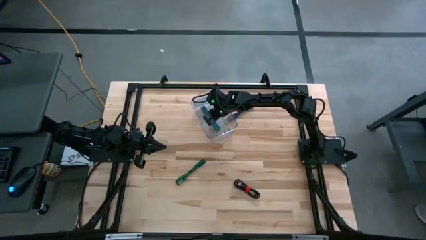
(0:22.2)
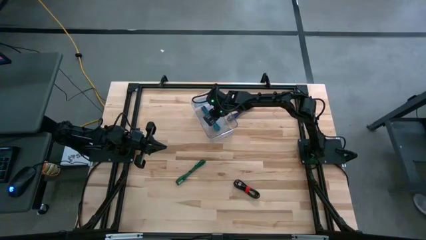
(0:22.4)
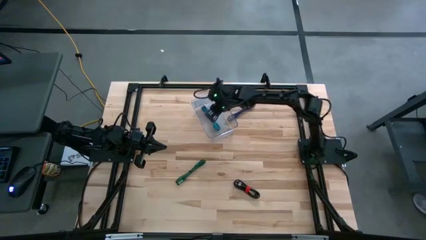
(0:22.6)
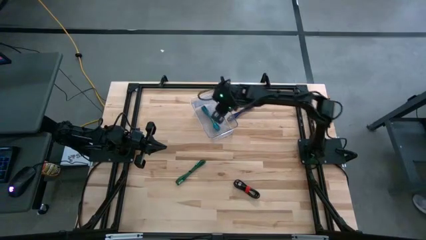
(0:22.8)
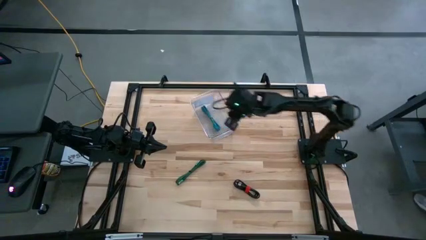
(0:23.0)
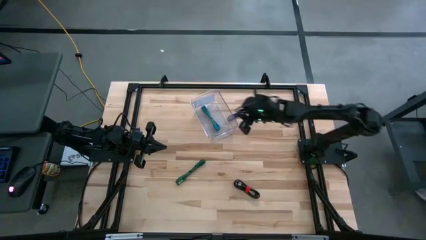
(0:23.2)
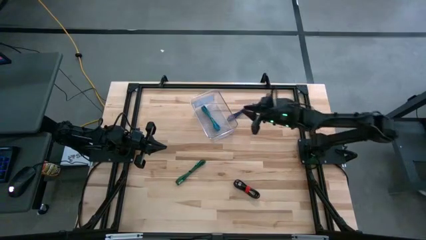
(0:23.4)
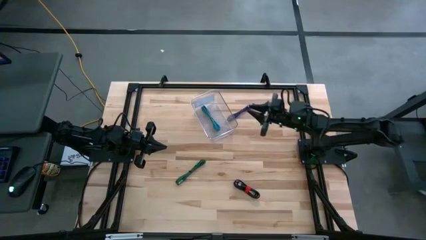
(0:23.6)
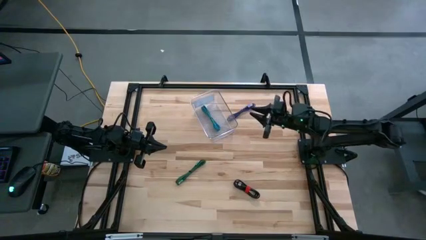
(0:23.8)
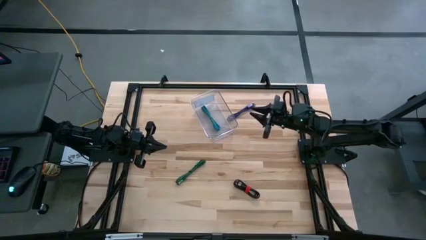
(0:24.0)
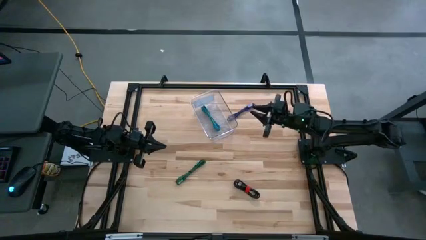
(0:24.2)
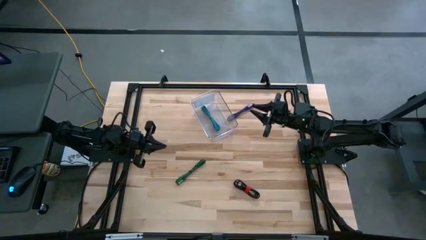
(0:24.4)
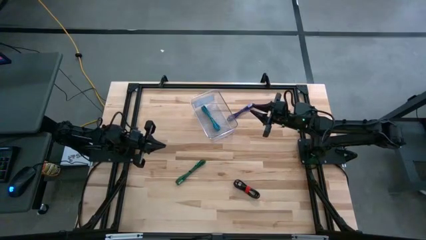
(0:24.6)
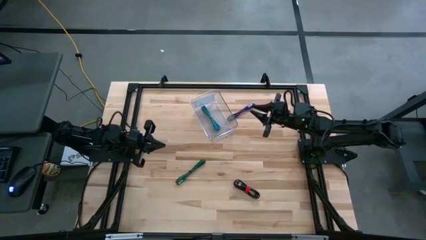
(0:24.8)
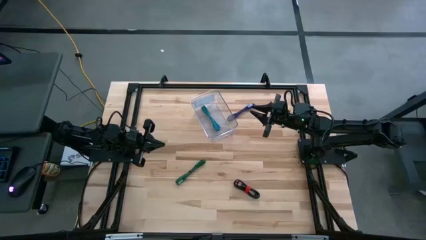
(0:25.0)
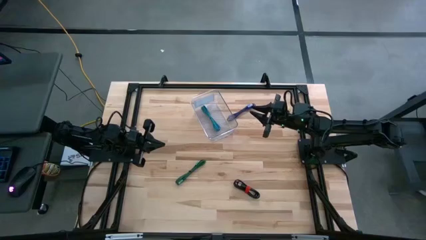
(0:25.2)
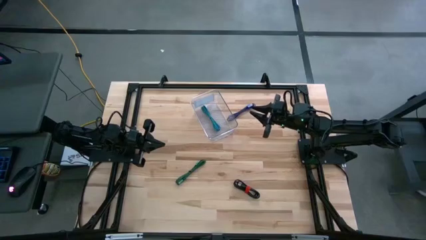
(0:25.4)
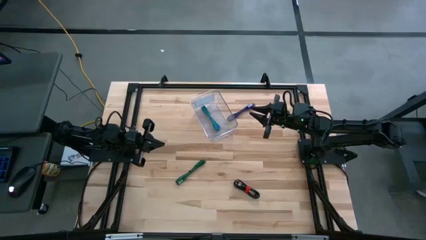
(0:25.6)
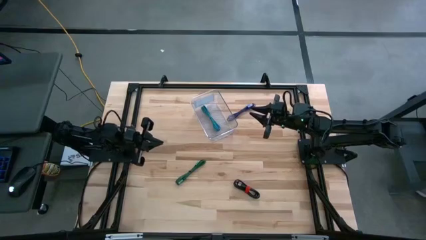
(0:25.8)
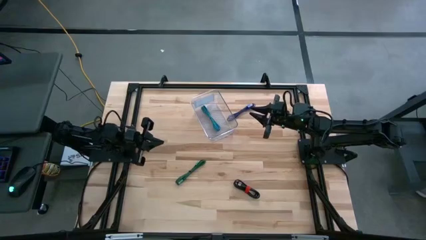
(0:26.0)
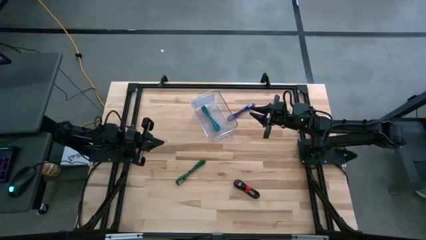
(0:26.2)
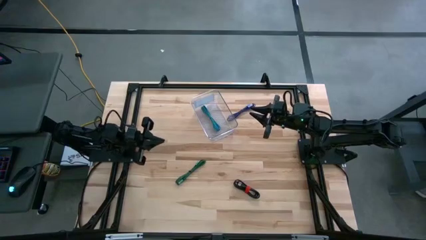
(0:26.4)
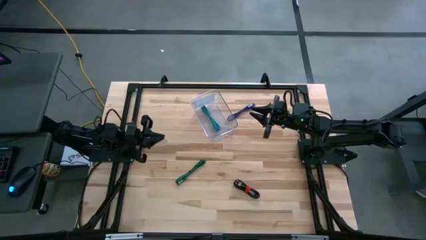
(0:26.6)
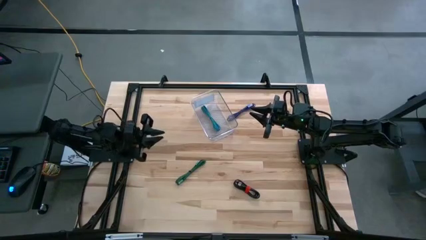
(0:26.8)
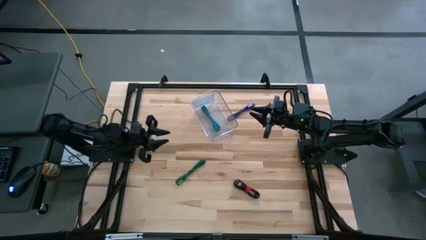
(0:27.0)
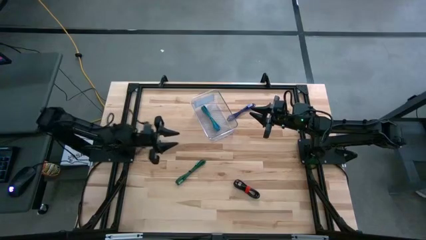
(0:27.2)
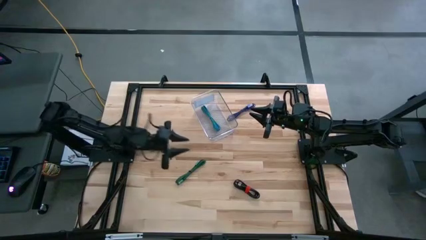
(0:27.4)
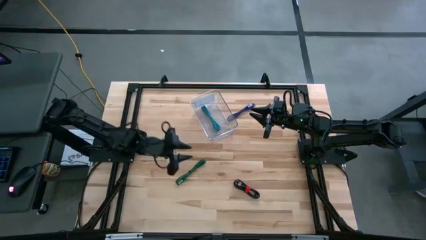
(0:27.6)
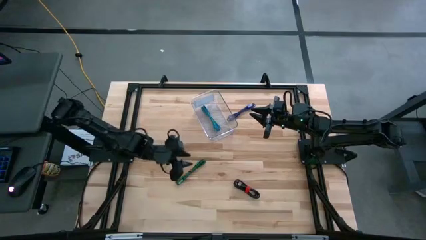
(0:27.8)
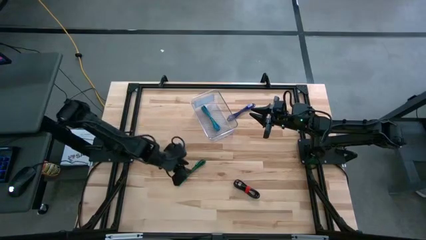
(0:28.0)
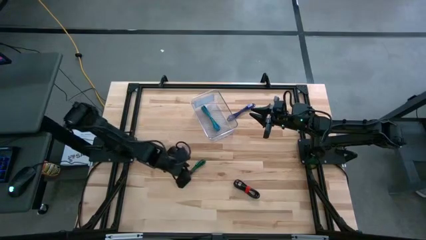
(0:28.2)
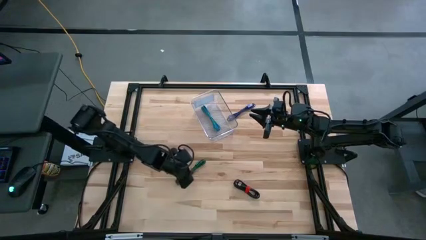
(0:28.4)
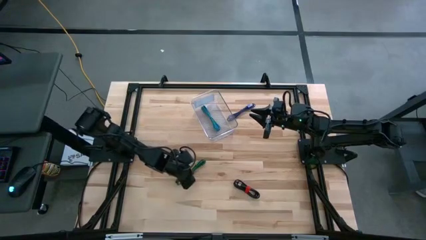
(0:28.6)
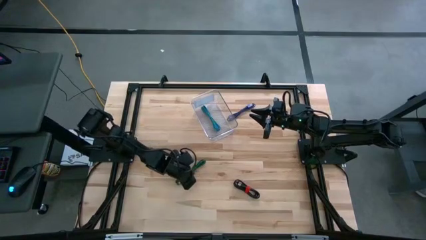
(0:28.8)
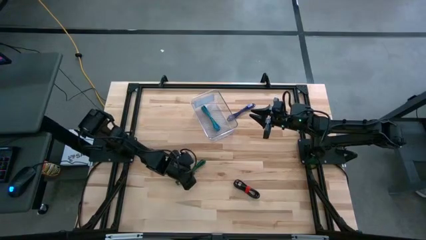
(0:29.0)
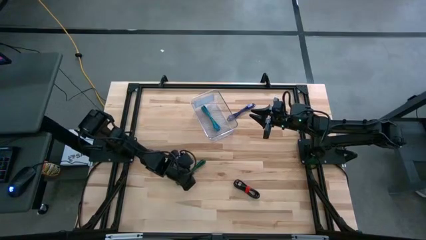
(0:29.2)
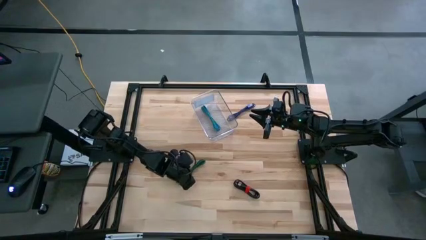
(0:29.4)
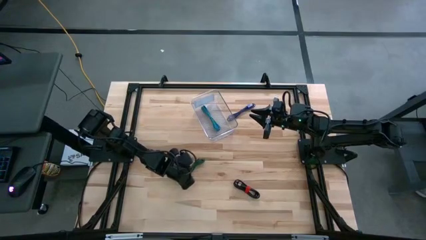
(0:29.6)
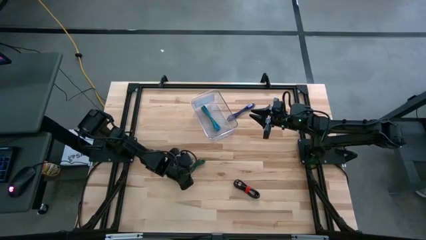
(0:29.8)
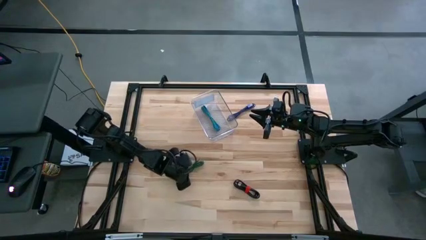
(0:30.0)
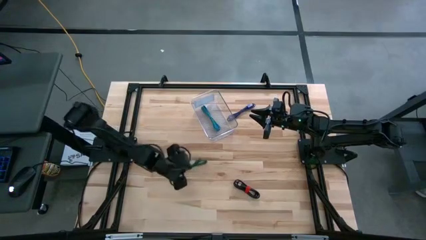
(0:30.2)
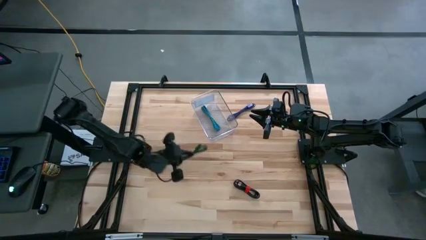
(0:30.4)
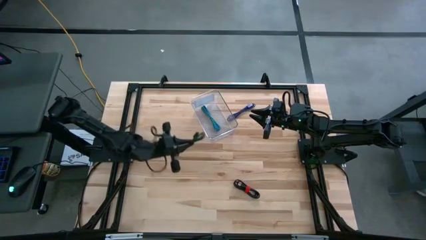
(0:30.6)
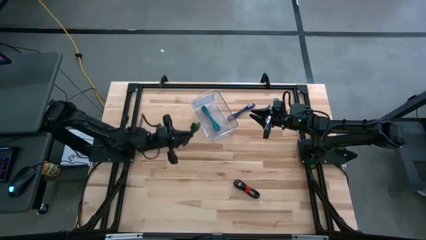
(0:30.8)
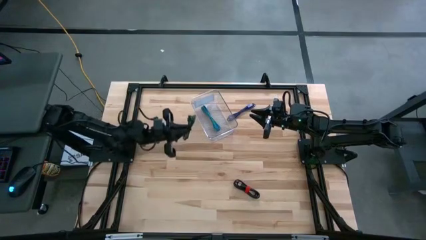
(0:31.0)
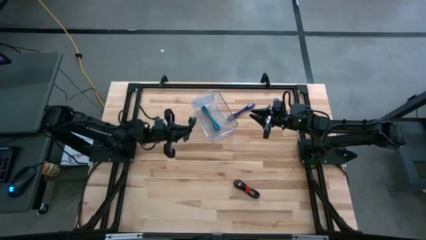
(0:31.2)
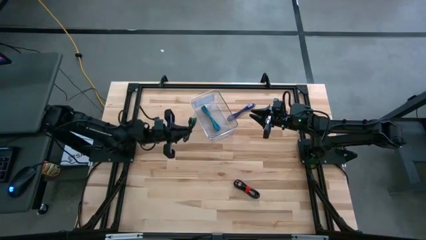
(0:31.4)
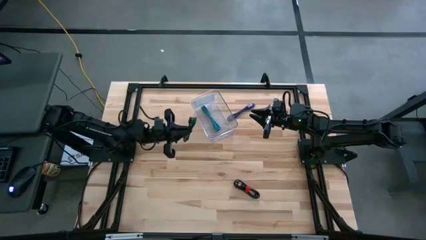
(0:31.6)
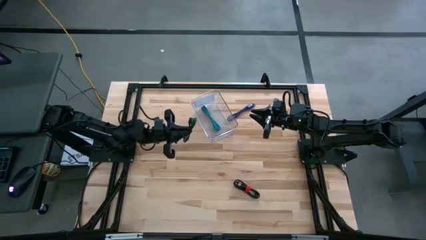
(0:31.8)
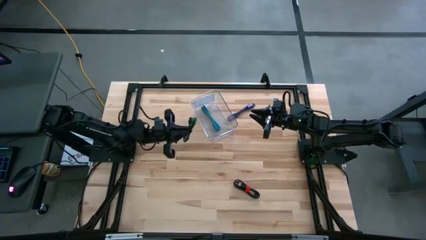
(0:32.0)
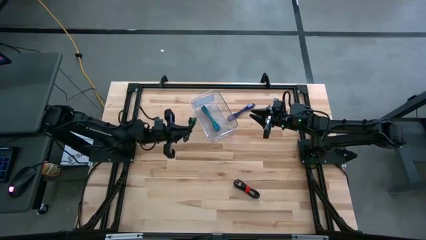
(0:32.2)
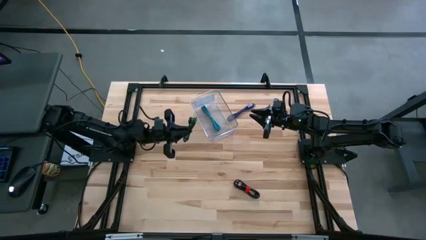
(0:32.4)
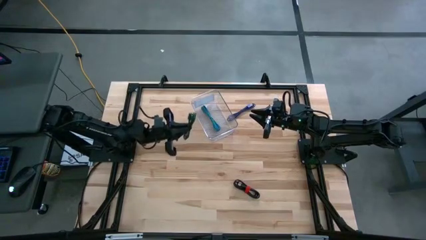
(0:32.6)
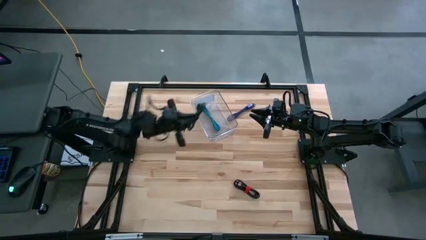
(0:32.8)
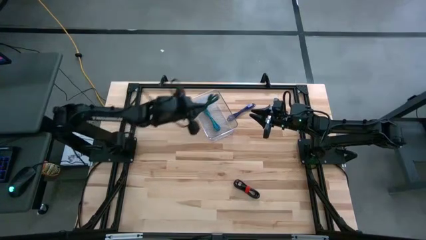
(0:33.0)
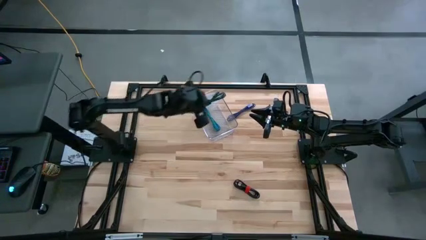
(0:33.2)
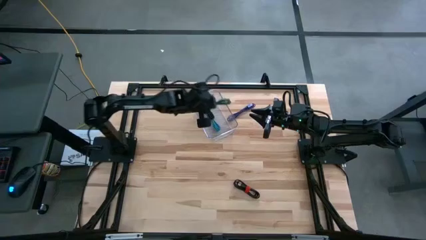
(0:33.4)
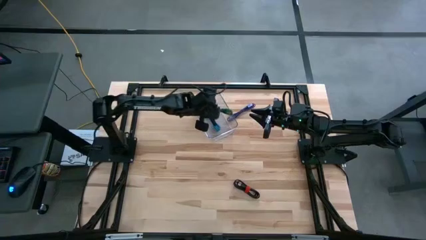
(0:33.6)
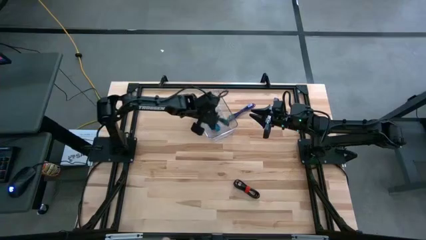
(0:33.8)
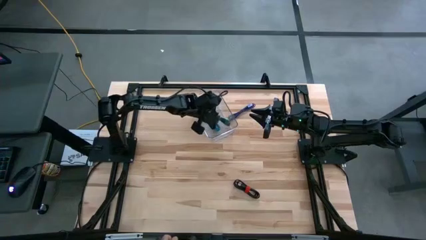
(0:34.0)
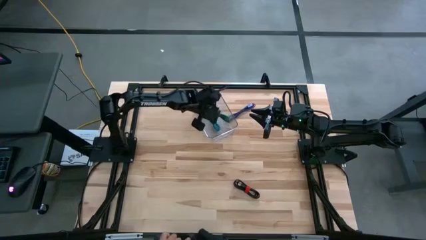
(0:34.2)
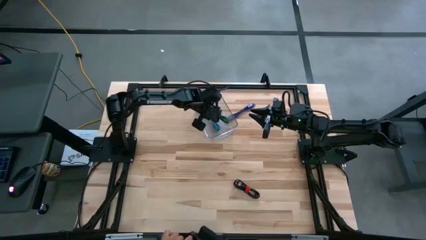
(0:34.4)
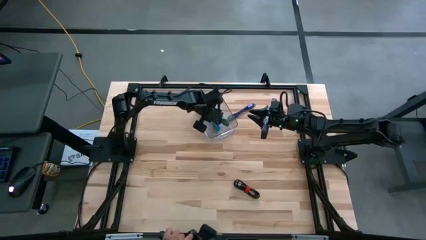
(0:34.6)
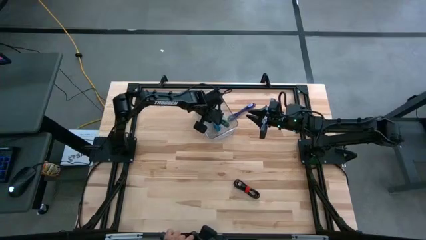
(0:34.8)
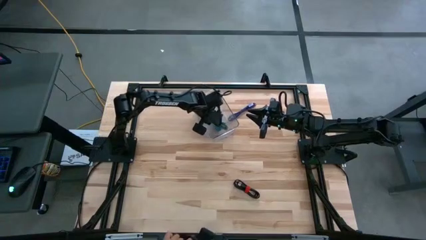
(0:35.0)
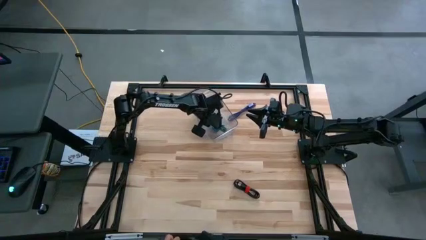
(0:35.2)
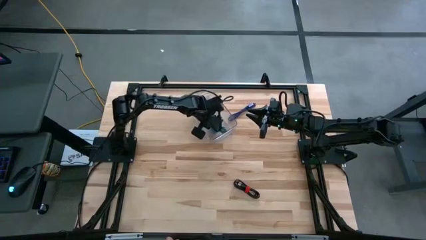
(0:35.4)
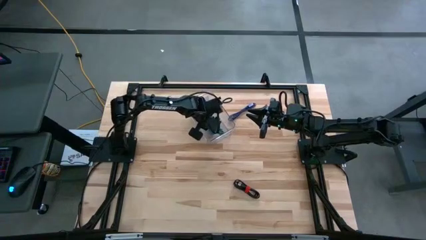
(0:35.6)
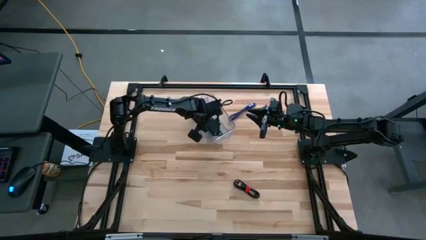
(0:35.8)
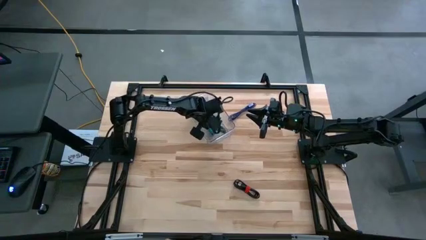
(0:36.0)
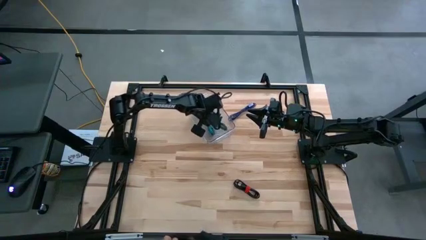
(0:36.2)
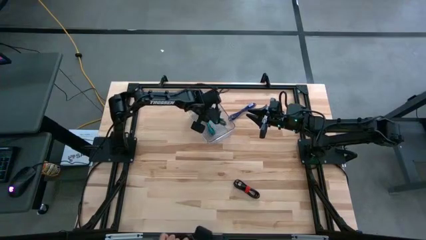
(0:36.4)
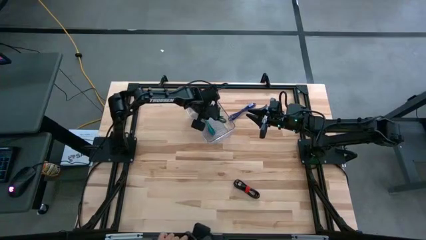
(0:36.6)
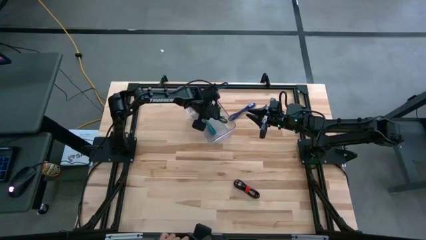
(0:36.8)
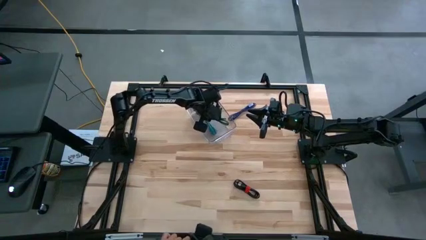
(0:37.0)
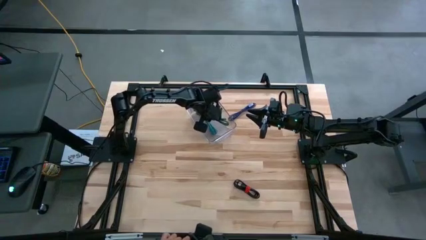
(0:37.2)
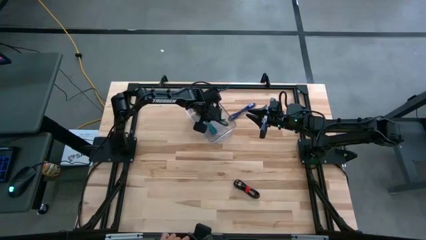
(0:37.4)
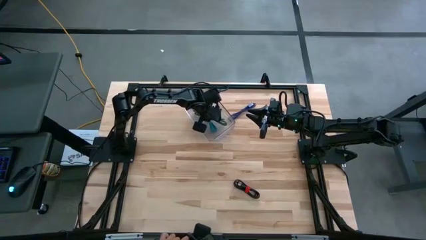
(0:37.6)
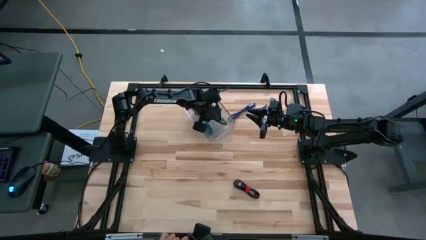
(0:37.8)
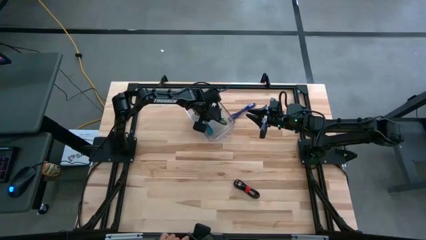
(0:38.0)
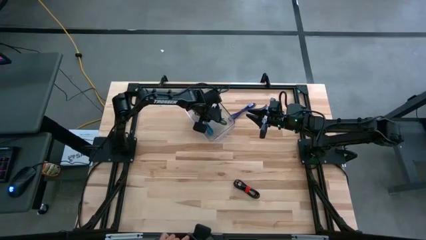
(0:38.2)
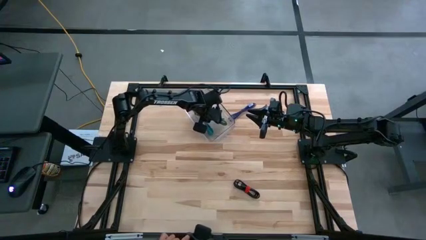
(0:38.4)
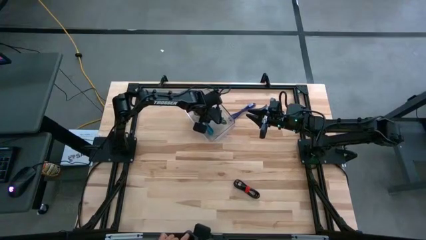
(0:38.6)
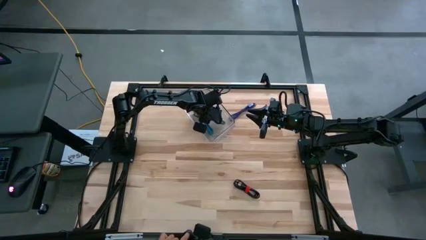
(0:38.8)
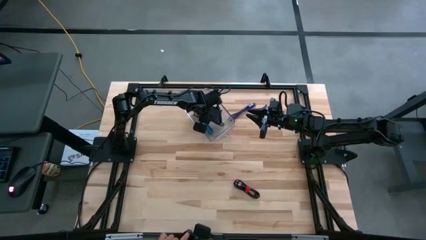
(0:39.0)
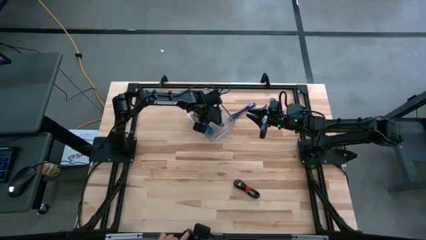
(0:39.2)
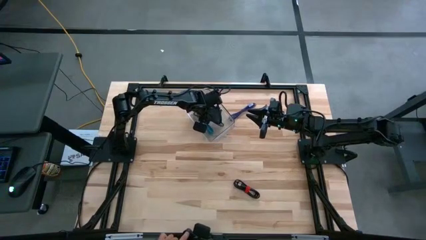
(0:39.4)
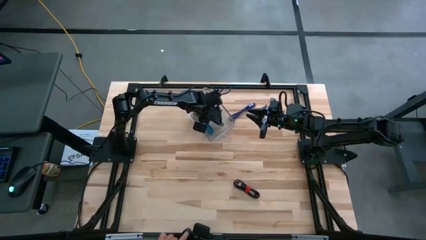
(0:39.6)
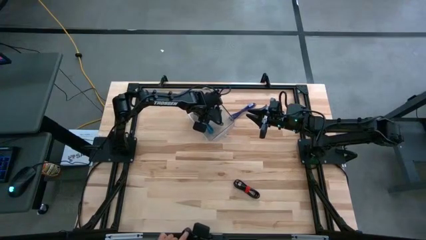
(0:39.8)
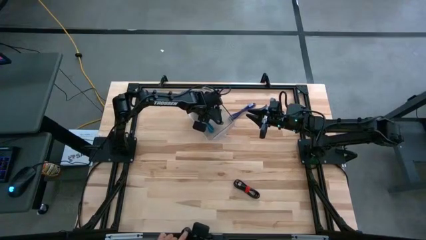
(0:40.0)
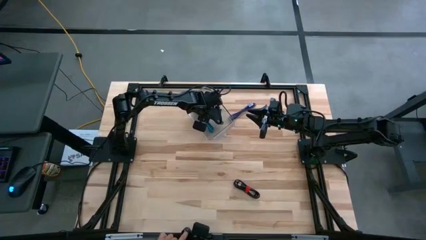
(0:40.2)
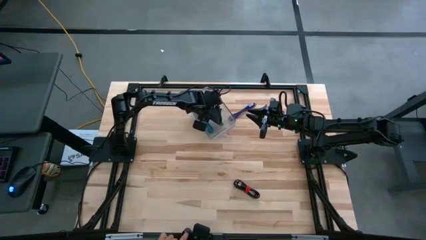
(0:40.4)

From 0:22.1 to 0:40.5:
Task: Pick and place USB-C Cables
Put the green charger cable into the transparent bin
